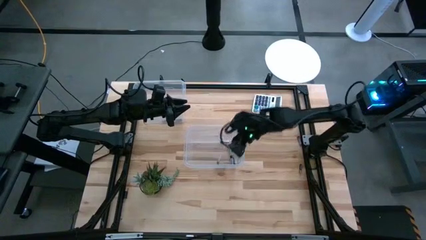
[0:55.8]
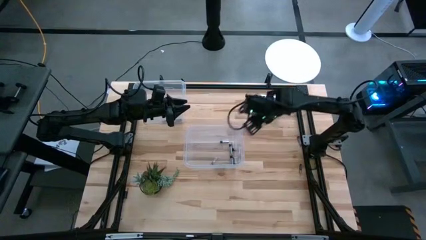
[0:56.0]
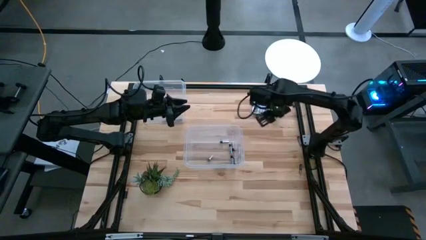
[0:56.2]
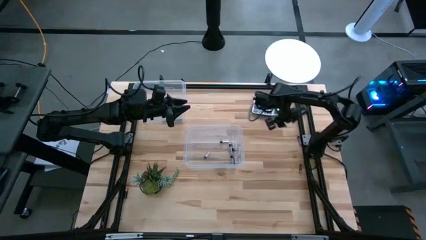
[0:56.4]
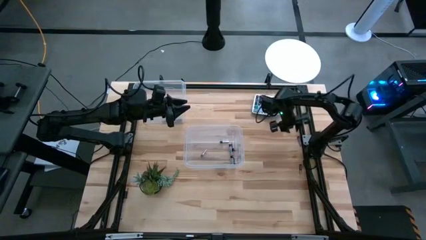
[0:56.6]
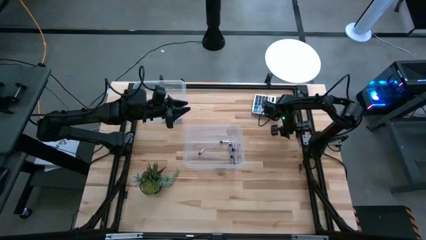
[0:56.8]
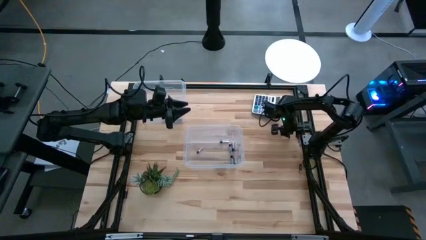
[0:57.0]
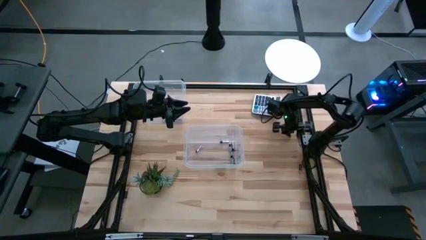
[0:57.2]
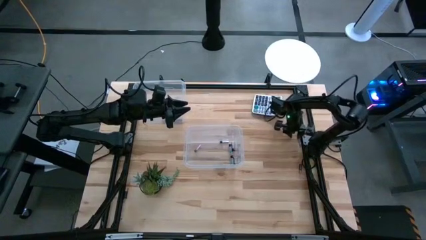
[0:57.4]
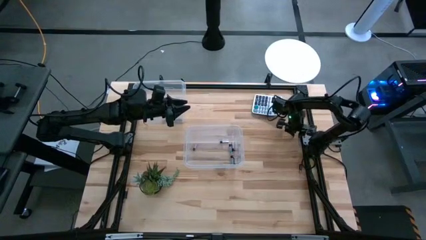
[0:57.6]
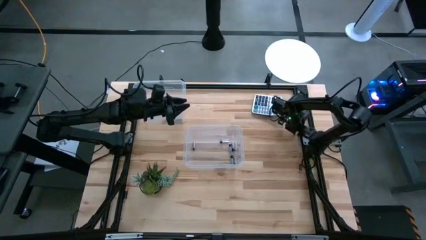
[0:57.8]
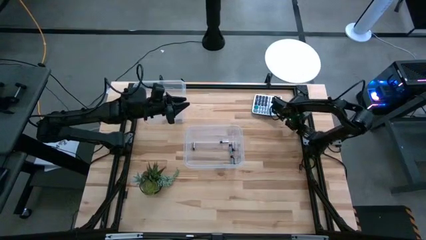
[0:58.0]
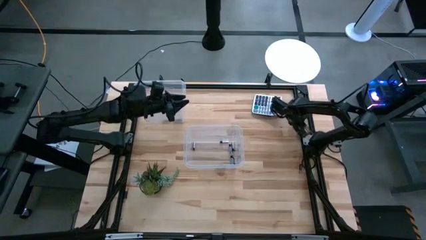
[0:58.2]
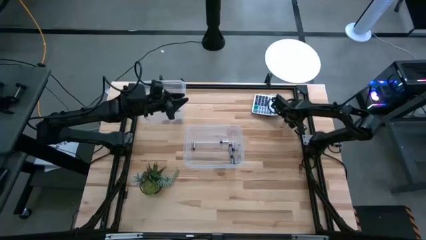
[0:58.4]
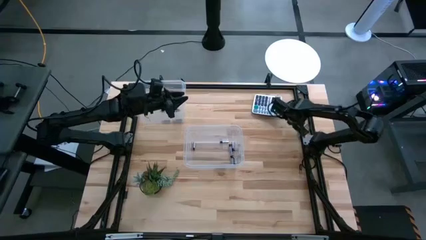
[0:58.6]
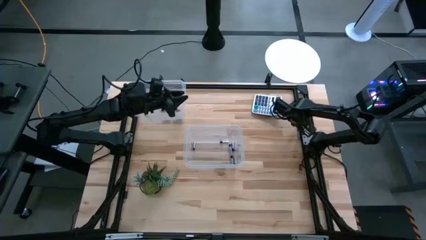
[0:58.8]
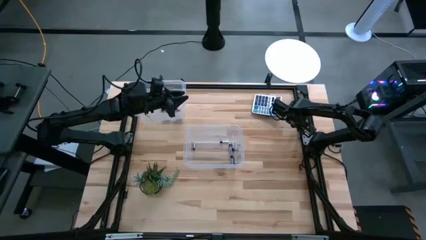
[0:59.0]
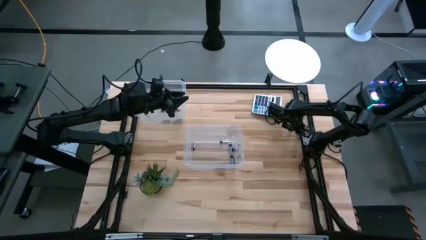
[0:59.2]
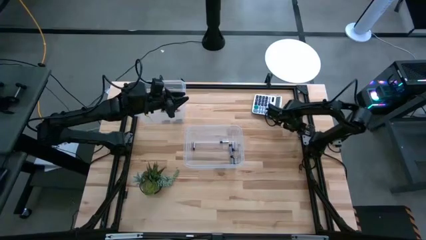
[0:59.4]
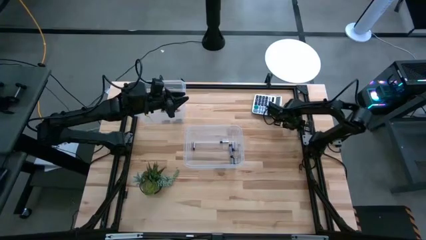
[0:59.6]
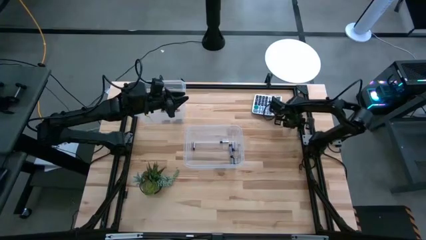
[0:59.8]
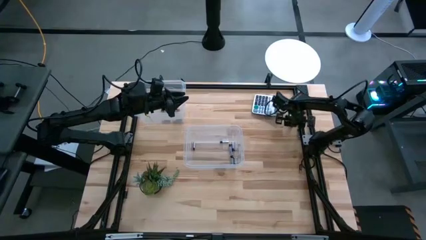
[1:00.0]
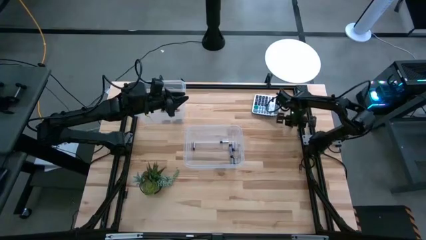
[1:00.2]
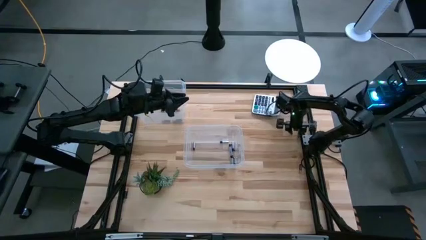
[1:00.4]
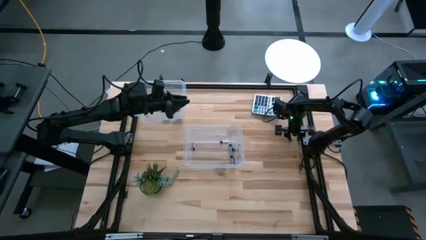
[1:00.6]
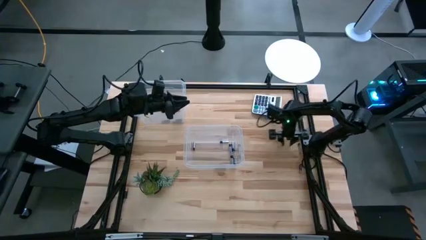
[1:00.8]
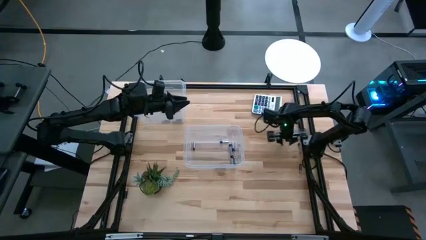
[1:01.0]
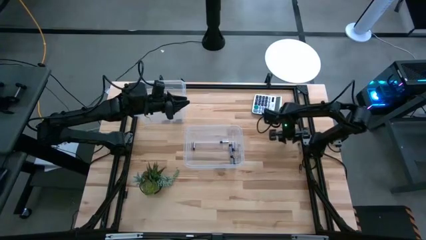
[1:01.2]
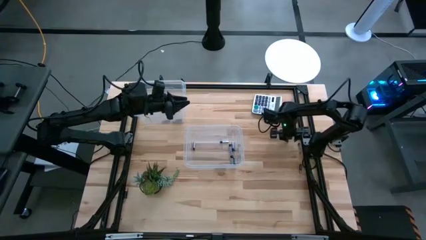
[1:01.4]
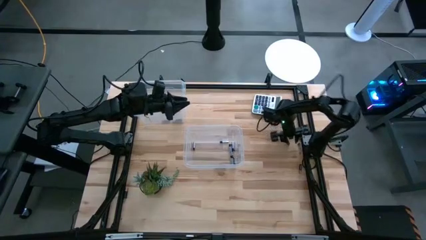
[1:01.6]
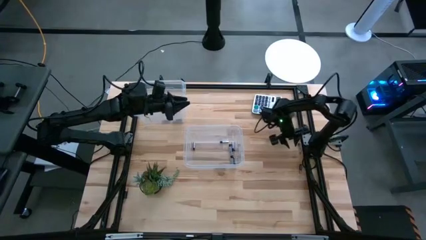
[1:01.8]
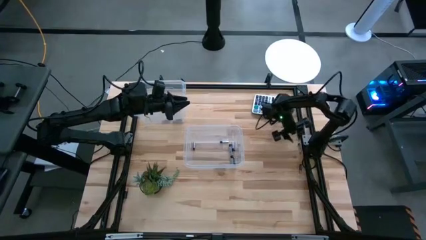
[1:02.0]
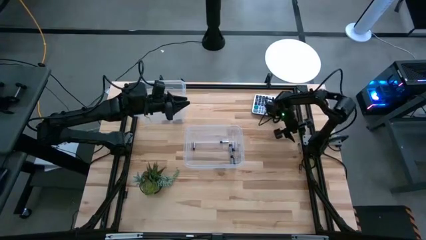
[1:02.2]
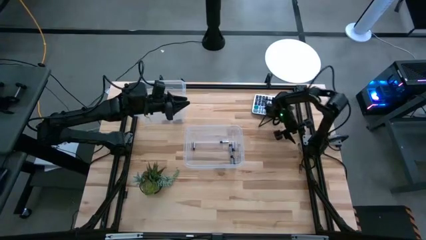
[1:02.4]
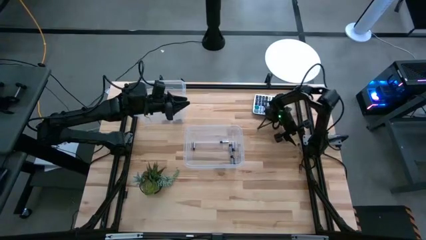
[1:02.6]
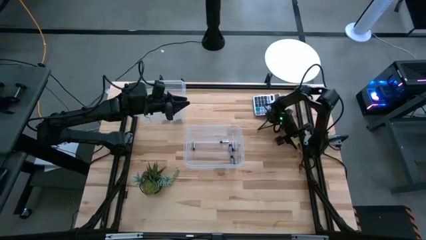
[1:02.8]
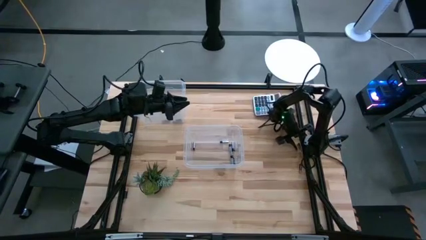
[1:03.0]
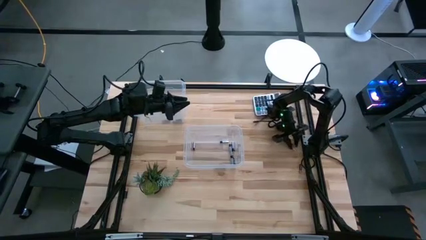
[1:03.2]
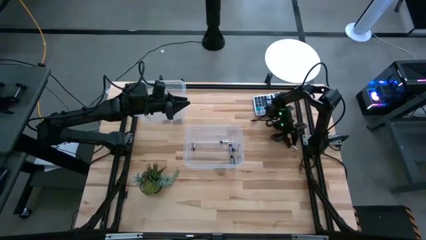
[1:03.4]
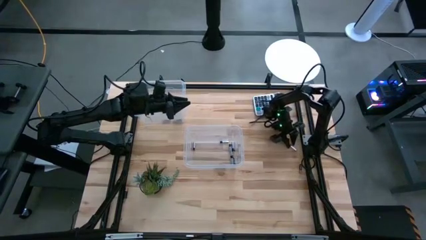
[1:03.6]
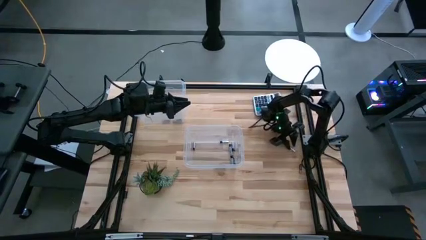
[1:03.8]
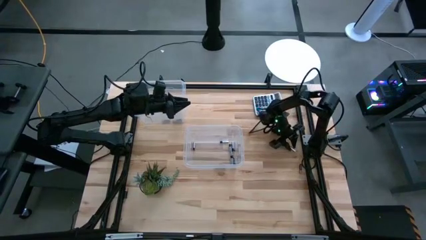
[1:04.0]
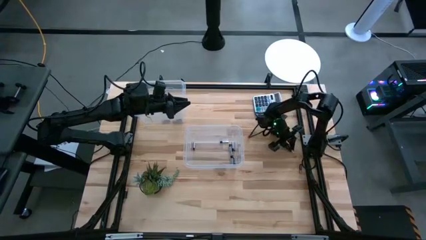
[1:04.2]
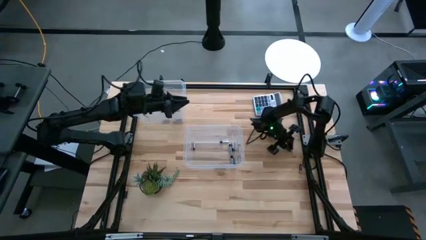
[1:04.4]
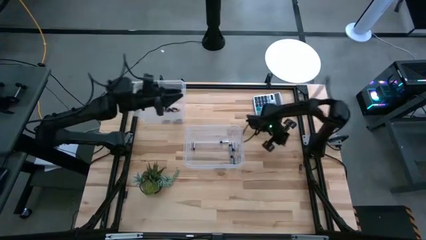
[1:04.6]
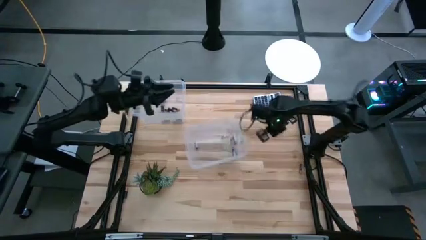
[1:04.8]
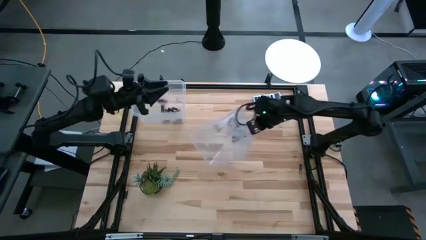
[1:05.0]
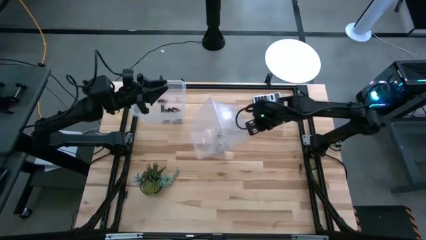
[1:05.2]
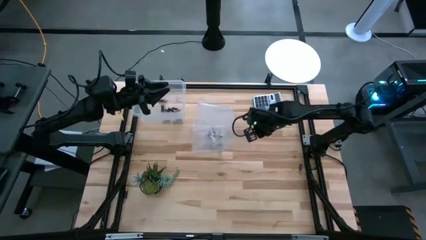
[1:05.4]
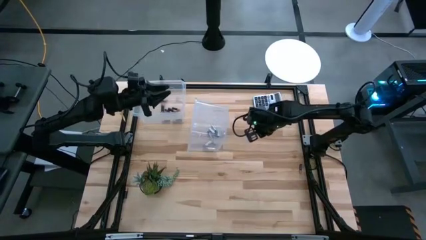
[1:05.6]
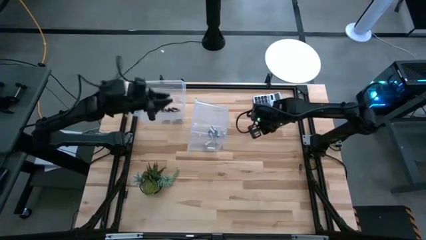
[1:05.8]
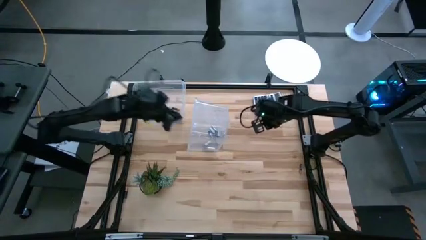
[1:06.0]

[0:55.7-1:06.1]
Task: Sort batteries
Put the silver battery into the bottom transparent bin

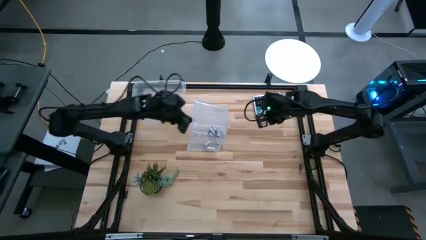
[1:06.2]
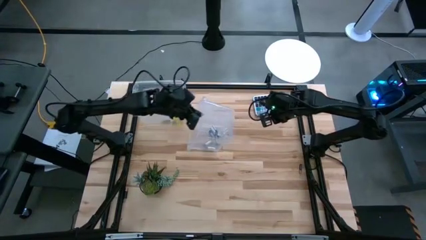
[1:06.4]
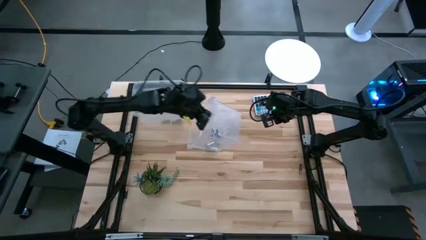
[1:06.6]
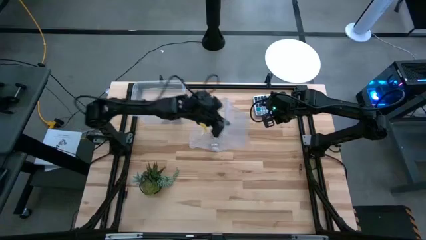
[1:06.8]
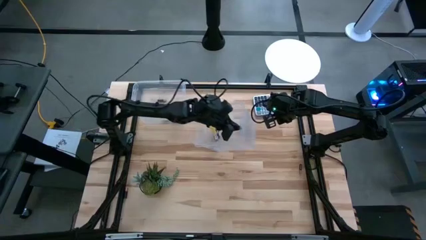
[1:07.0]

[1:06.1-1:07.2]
Adjust the bottom transparent bin

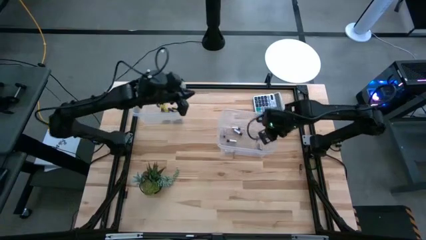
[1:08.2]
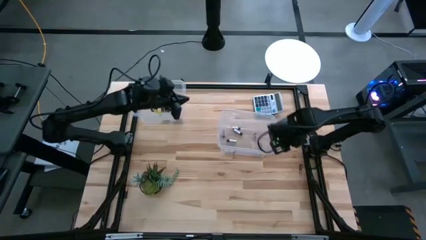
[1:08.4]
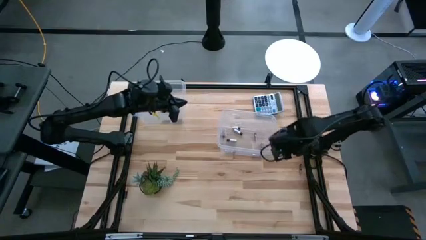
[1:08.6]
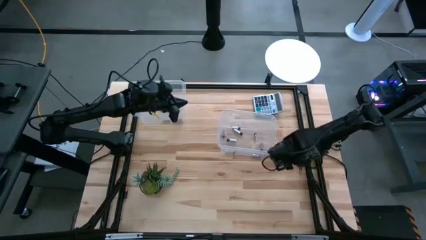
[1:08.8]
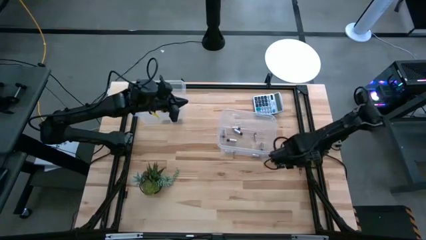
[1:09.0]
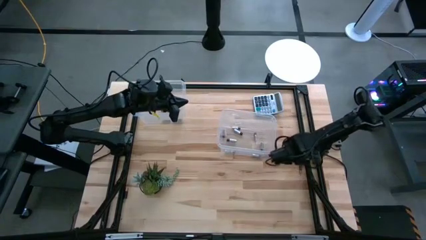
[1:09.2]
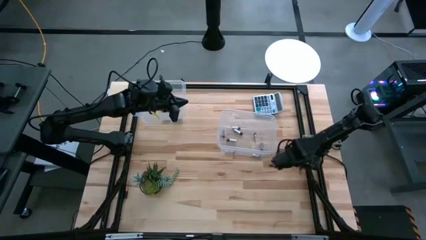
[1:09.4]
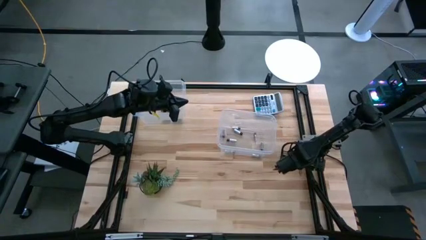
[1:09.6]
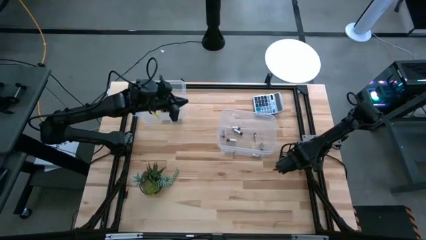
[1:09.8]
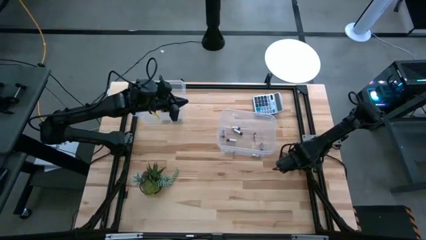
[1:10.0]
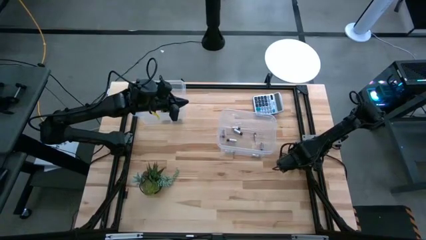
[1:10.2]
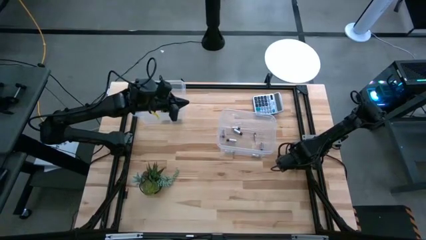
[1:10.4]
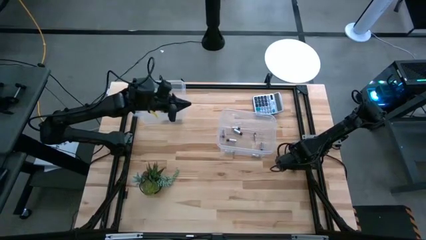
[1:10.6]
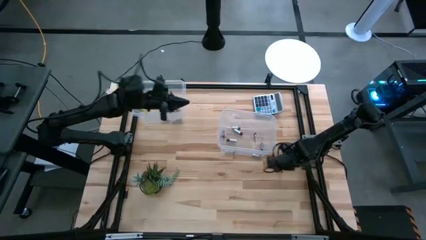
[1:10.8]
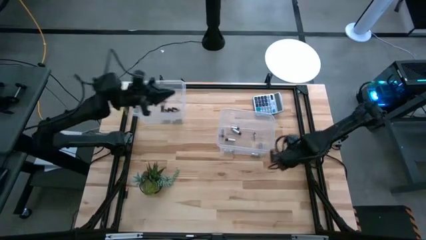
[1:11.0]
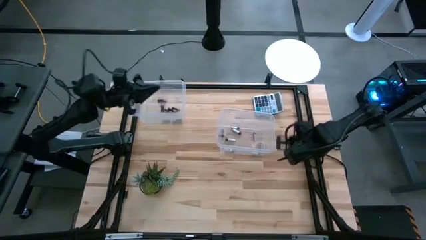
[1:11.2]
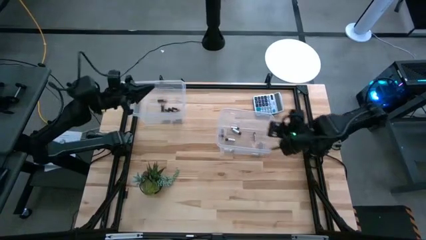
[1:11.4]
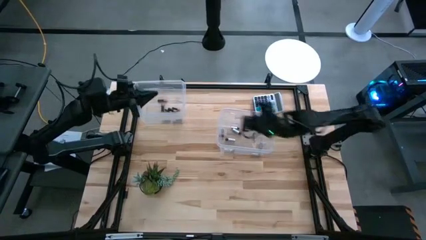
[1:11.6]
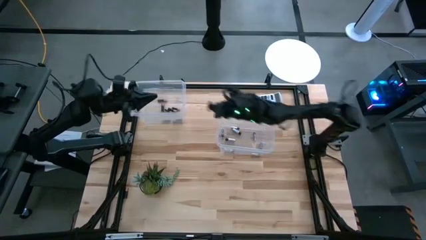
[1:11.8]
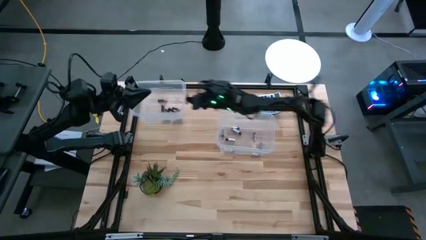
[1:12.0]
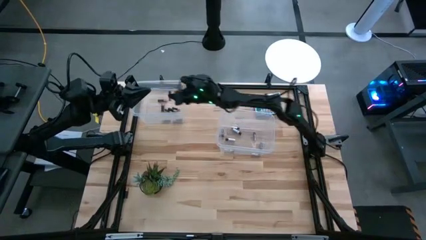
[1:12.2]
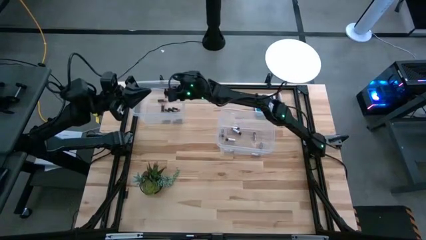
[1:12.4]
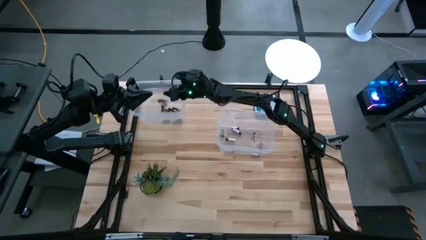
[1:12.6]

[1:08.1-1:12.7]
Put the black battery into the top transparent bin
